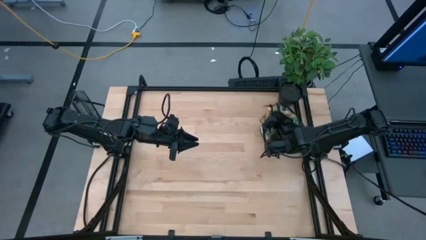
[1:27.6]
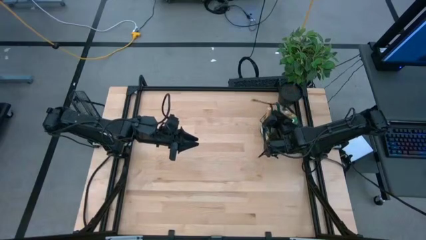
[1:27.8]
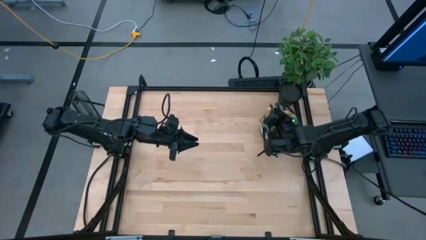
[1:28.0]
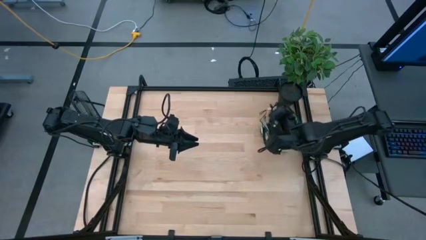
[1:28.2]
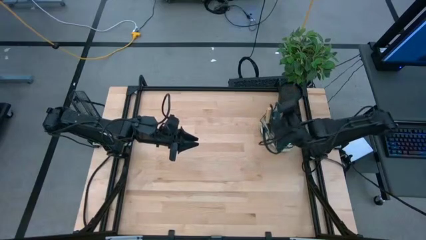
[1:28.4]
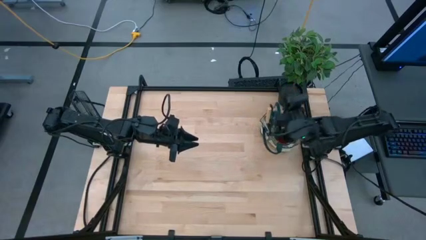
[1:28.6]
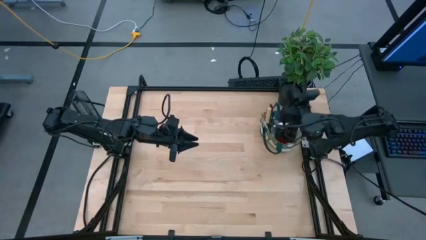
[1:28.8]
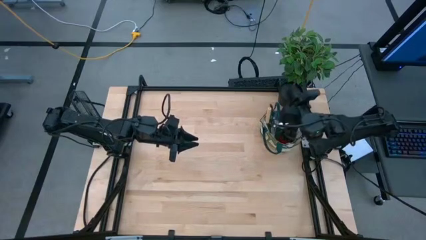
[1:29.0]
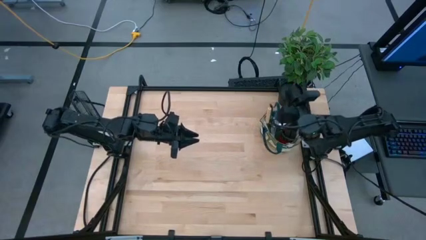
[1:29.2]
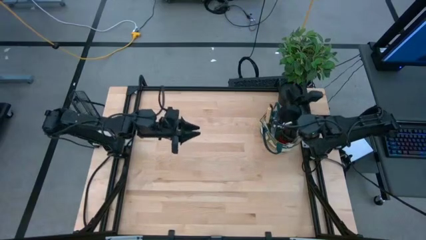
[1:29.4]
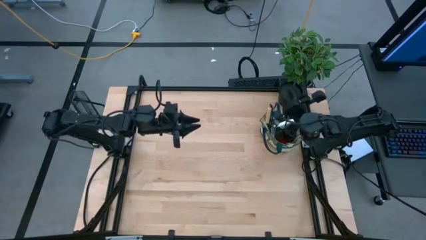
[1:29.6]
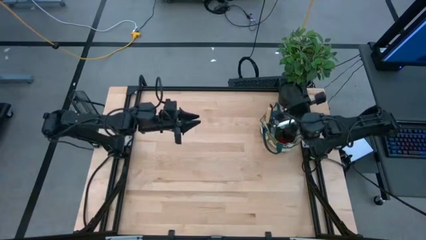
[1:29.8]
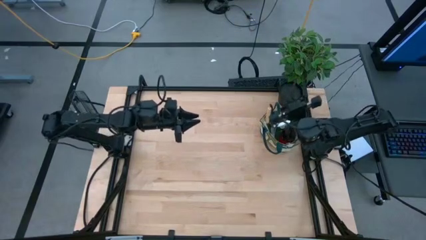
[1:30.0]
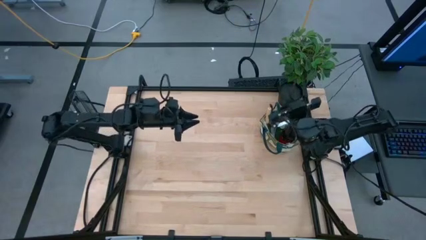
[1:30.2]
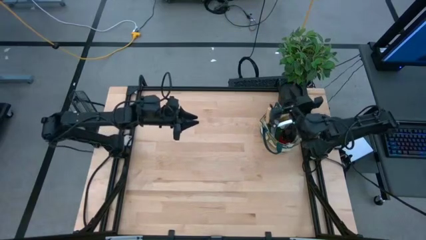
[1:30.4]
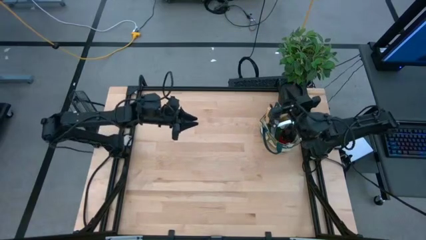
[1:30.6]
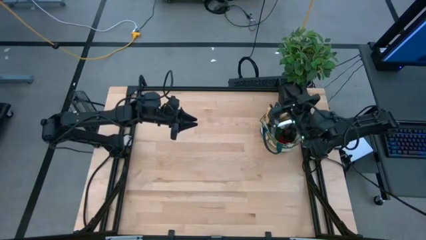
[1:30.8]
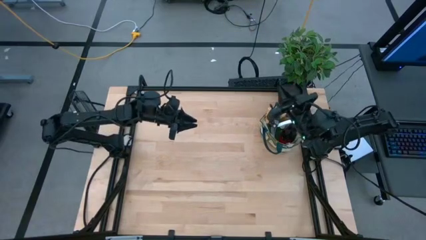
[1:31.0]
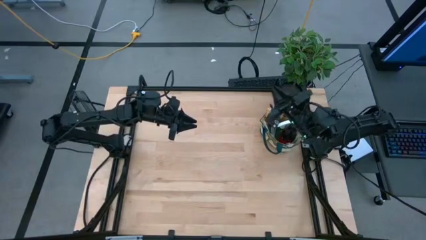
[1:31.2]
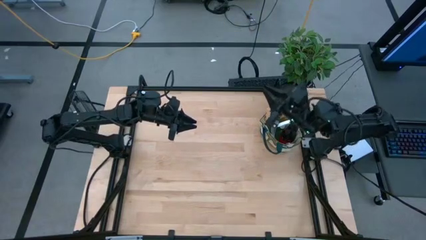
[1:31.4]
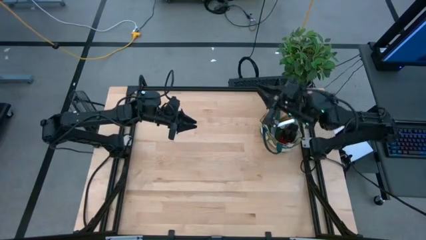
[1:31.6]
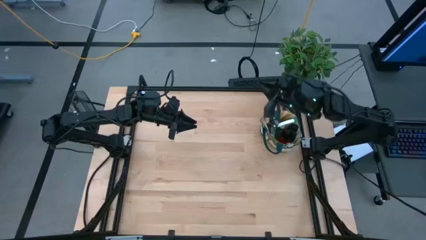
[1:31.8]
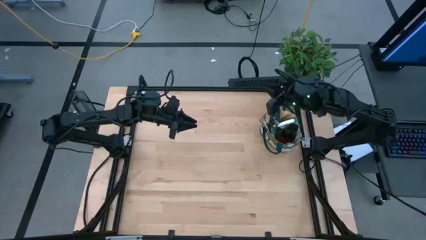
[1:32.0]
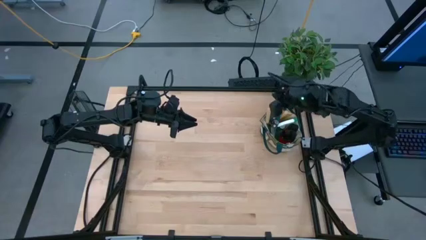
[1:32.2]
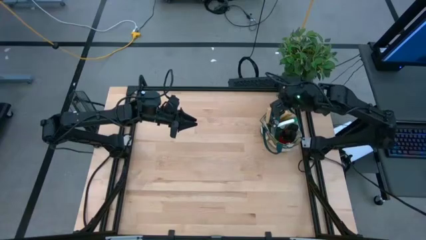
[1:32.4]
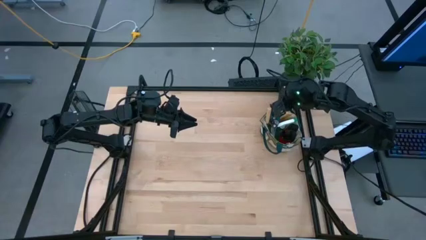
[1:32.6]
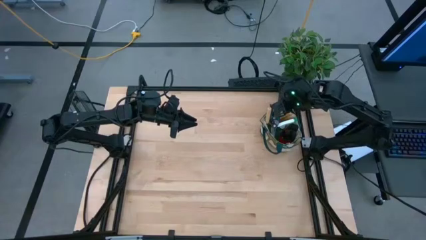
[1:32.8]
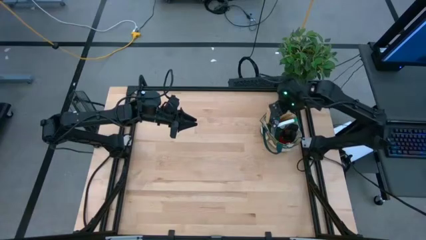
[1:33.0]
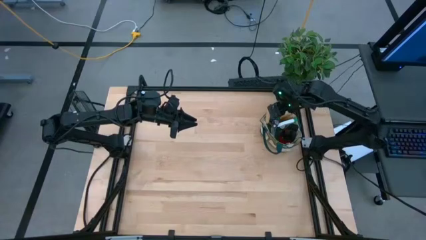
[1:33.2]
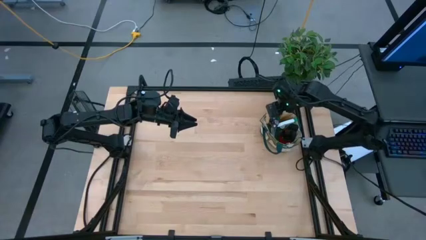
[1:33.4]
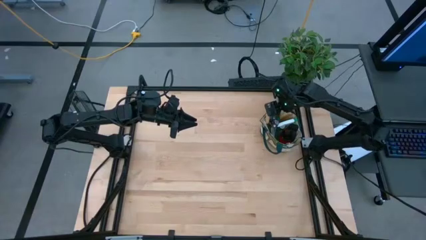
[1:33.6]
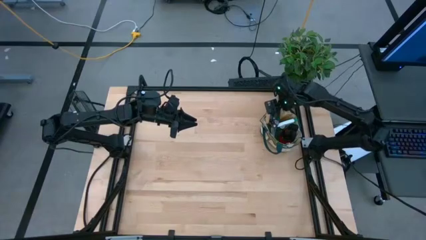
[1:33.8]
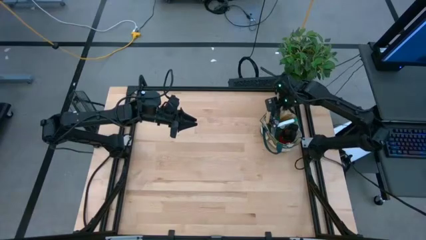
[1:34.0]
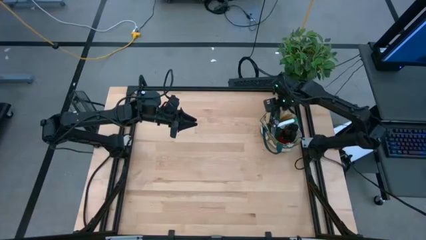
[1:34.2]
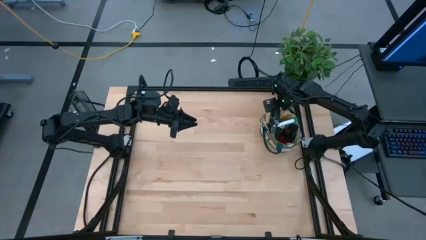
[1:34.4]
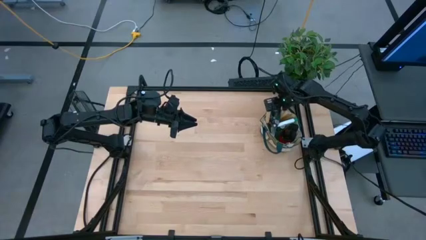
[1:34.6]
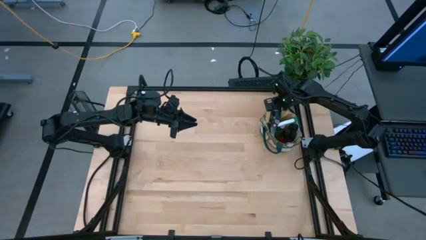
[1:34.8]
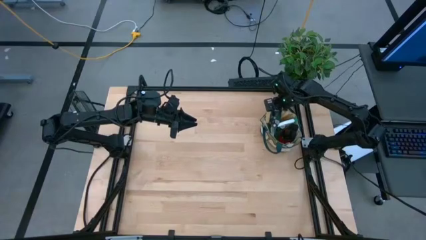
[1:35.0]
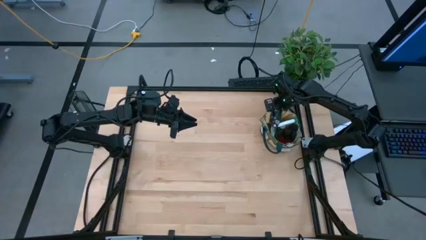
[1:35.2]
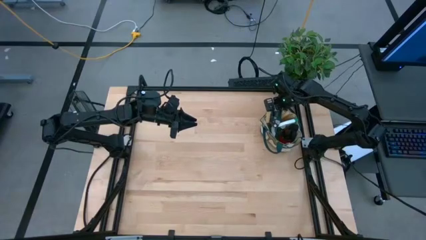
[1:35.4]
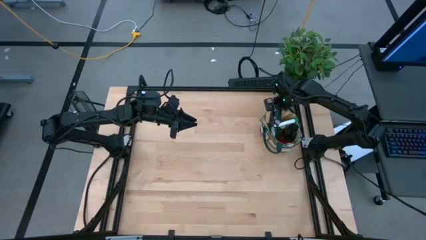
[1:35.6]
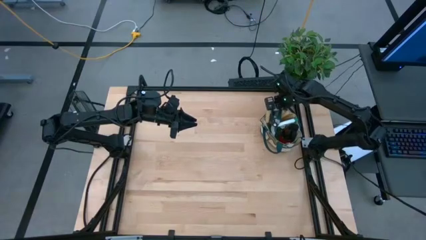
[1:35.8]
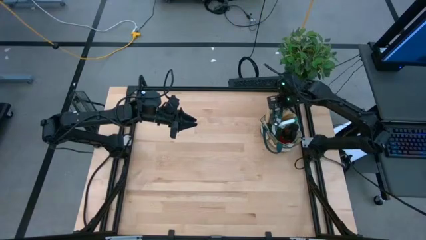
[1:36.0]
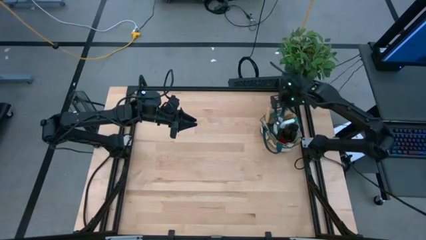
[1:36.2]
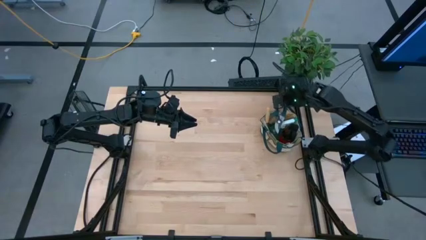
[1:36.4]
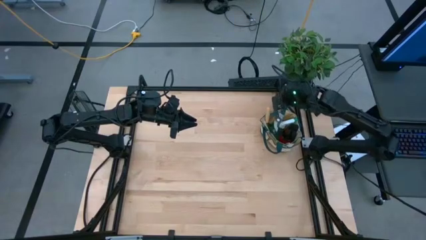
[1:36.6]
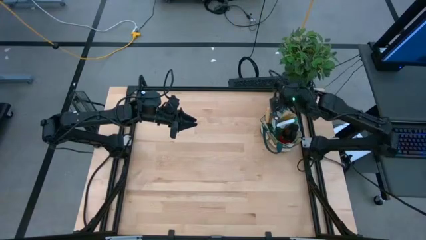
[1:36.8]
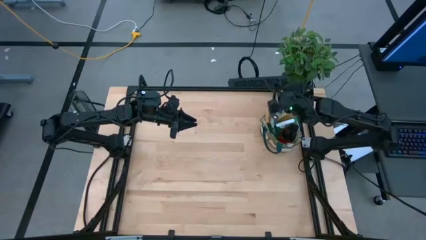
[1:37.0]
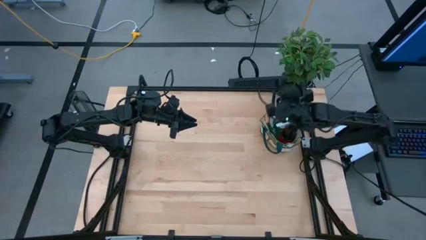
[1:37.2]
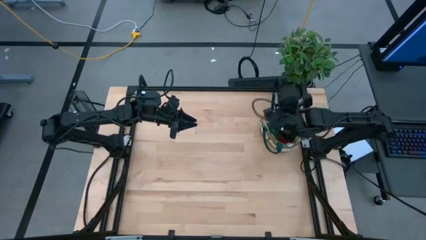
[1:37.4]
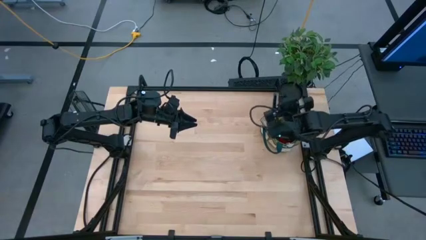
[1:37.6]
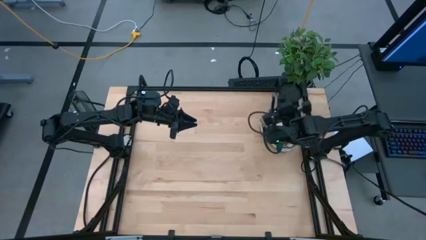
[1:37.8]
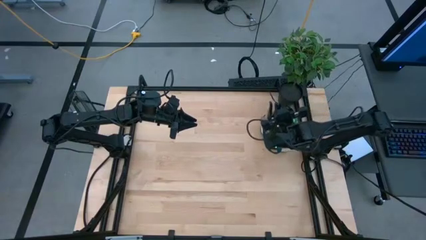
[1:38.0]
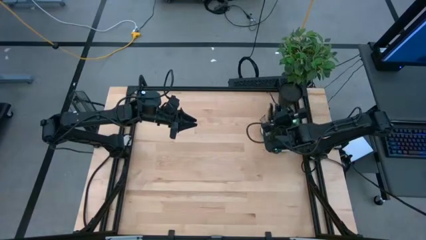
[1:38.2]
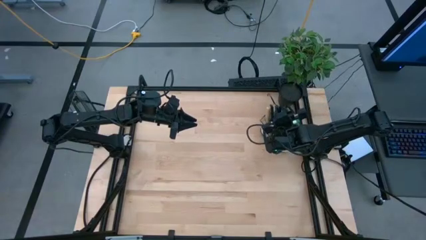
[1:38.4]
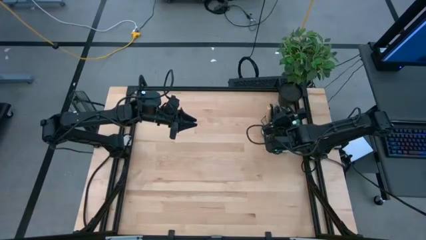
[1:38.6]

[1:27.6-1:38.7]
Task: Pick & Place Garden tools in Gardening bag
Put the green shear scissors into the gardening bag

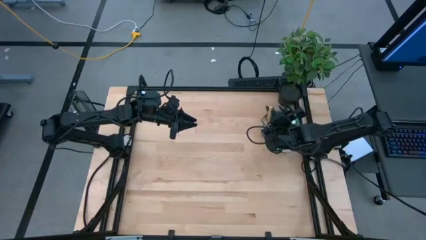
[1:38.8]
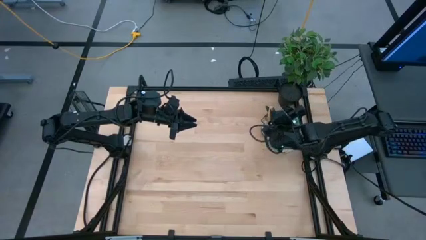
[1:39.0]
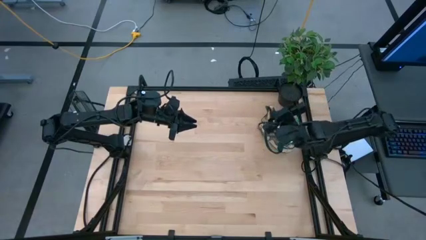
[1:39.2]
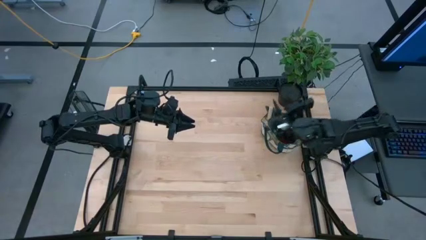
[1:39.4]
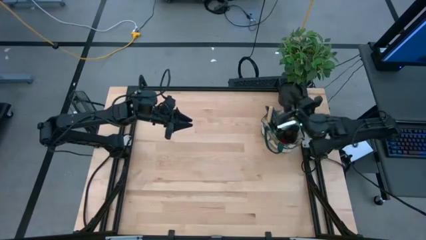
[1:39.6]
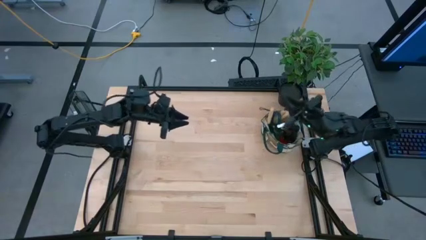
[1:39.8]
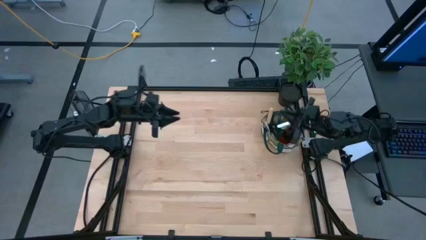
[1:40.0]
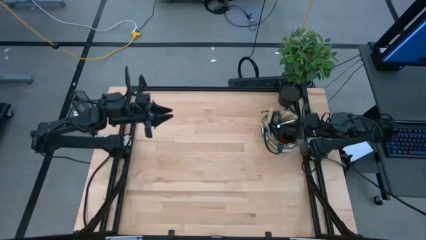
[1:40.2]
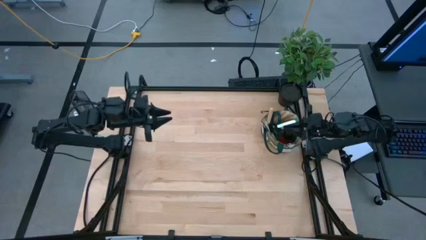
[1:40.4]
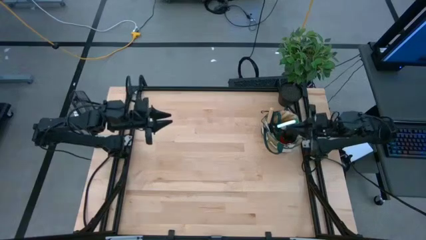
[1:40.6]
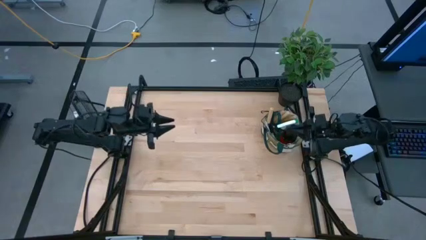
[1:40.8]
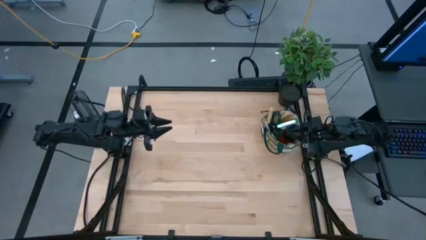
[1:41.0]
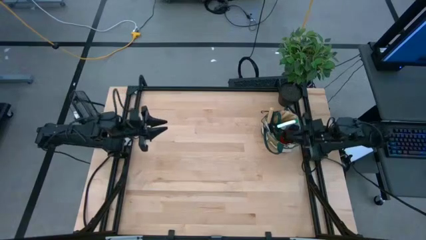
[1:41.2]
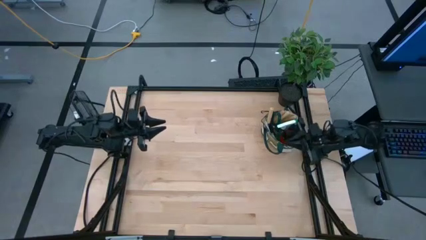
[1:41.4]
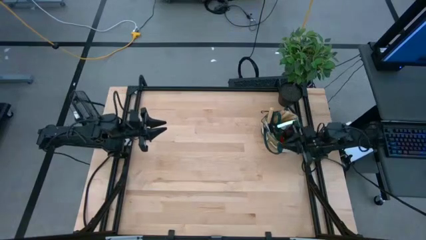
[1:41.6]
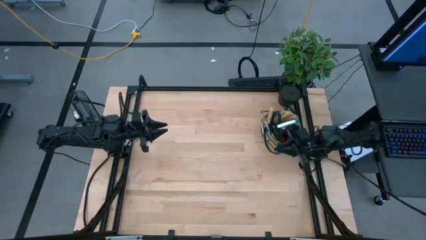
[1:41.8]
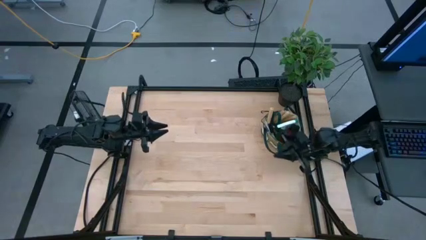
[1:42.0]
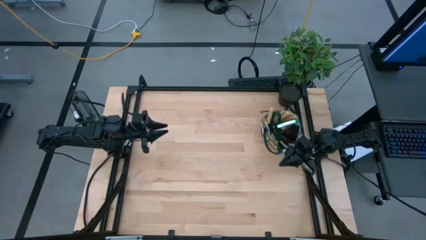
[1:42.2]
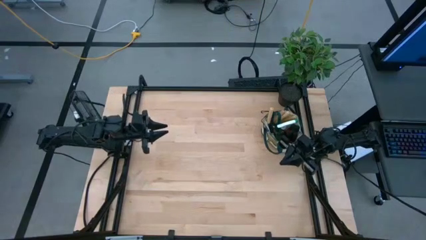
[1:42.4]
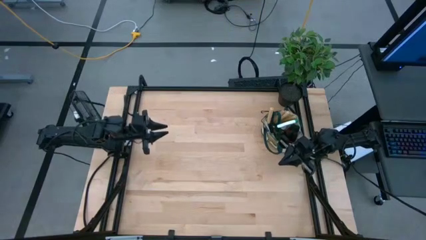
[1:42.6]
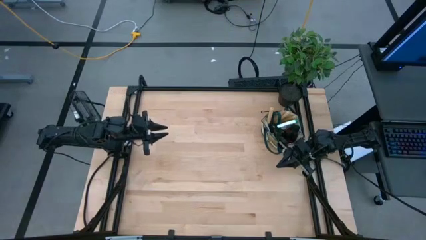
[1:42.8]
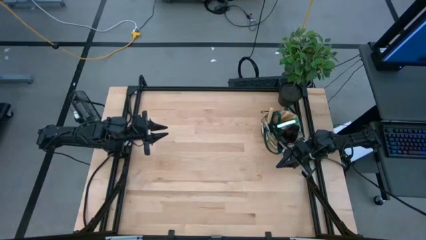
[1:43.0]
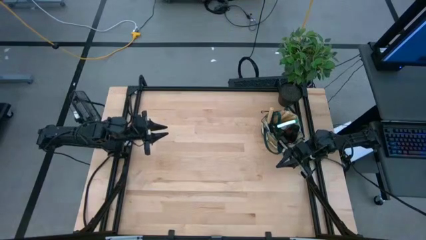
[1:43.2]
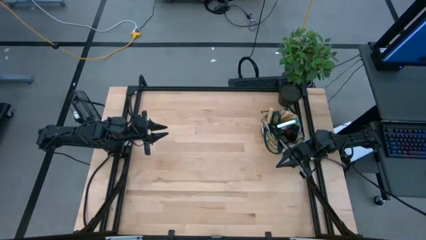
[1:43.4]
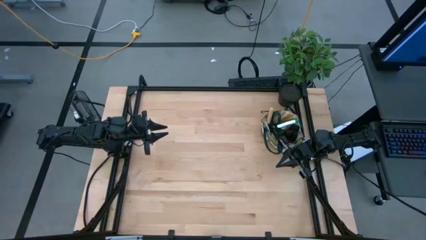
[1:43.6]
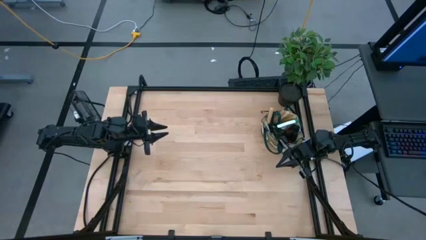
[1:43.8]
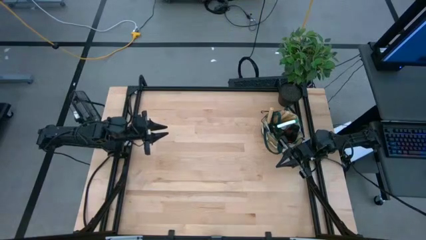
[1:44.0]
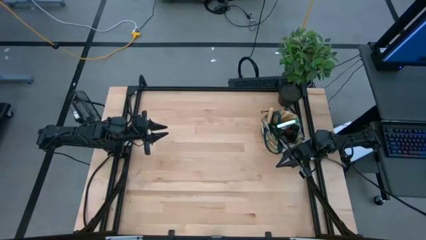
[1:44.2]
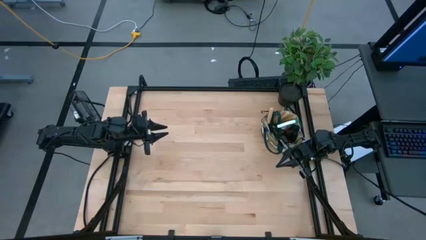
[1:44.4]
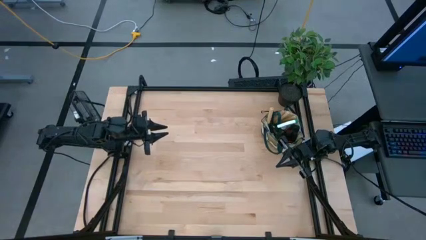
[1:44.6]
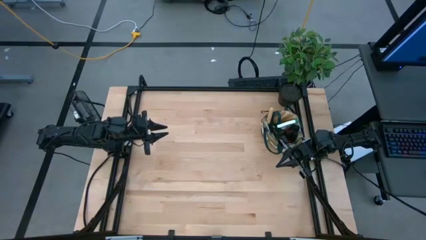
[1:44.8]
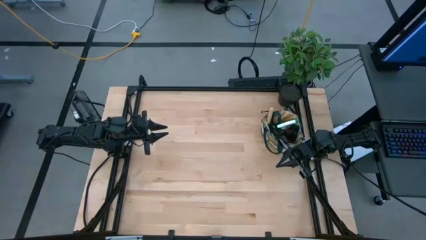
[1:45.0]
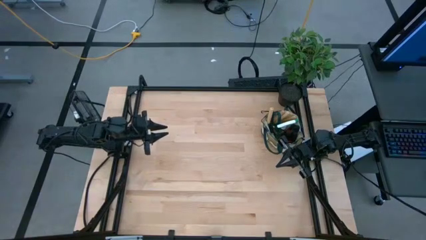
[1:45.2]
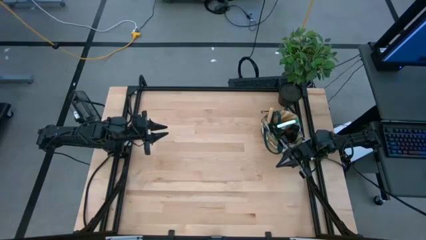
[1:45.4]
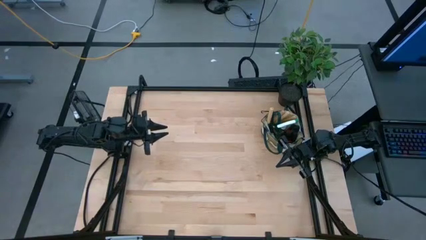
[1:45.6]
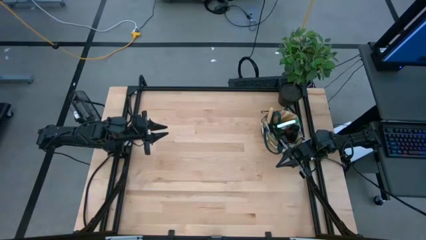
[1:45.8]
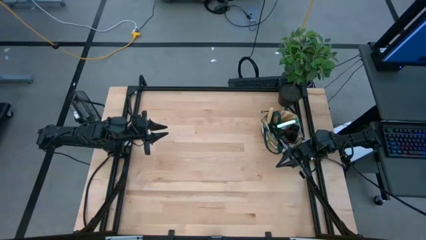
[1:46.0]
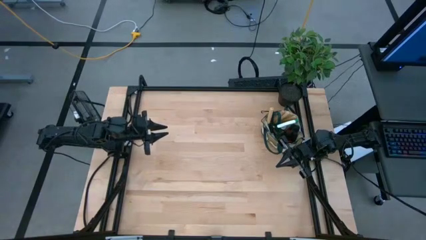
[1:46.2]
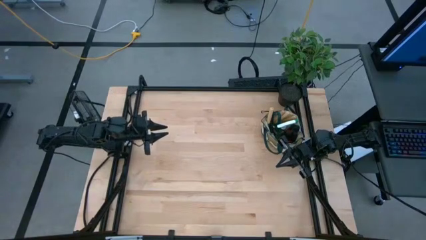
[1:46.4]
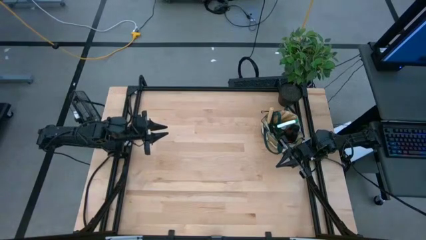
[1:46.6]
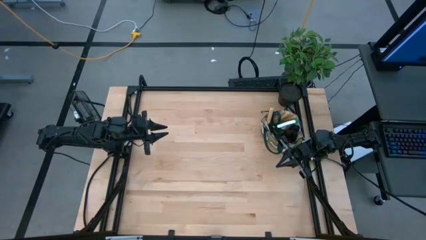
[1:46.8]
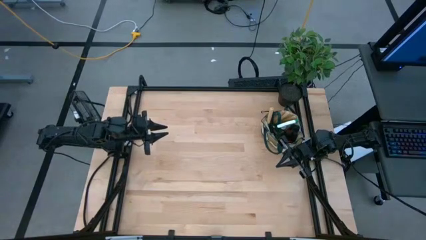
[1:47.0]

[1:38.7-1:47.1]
Return to Home Position
